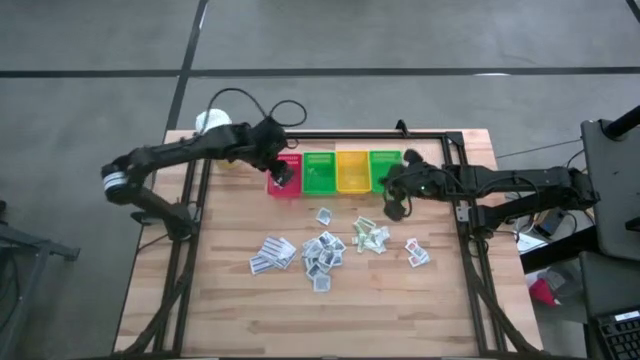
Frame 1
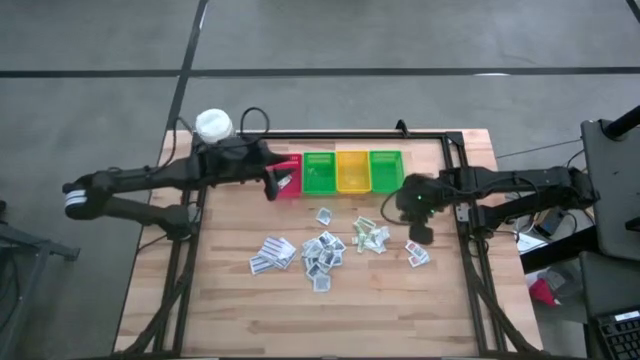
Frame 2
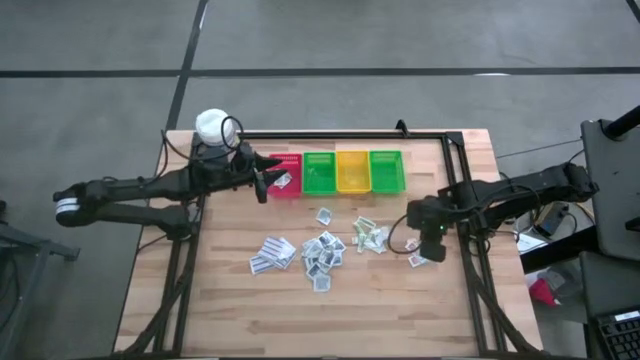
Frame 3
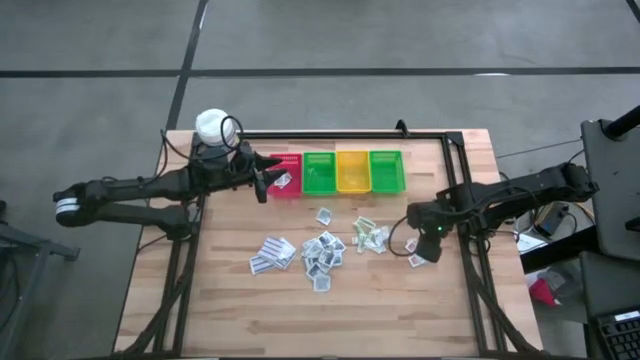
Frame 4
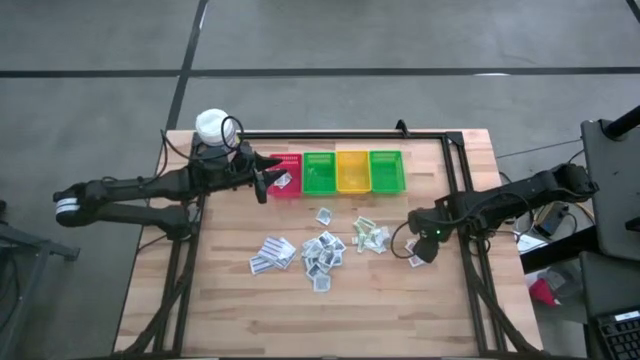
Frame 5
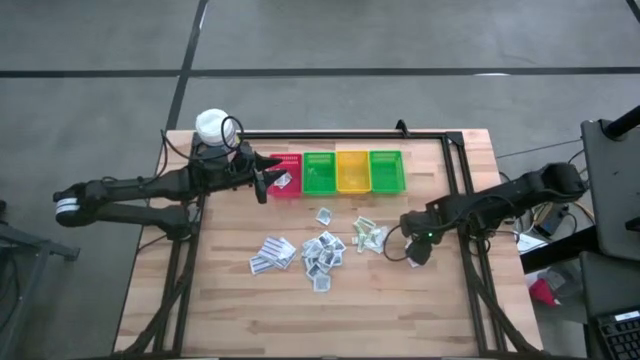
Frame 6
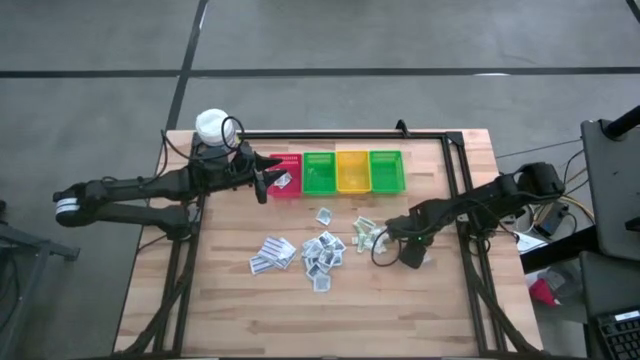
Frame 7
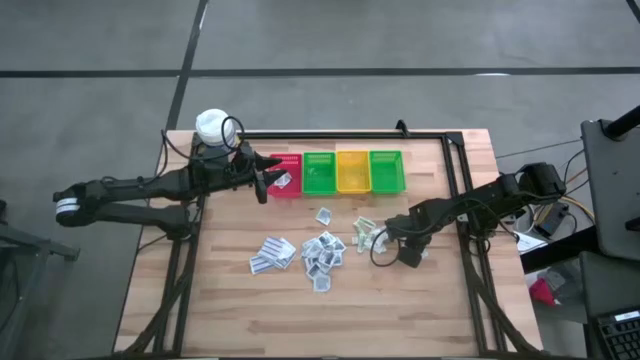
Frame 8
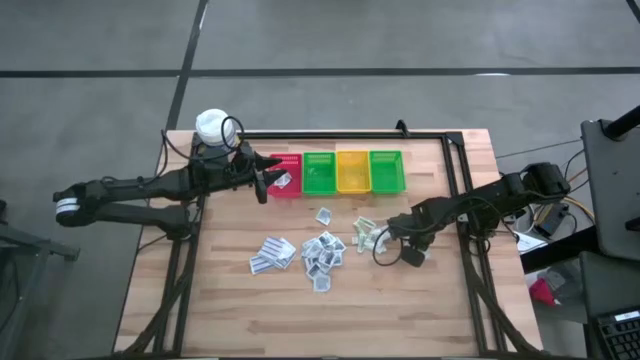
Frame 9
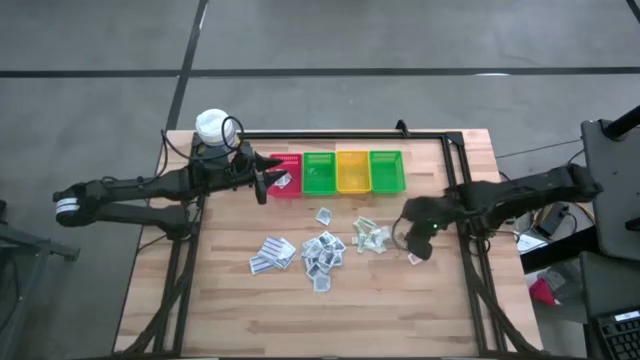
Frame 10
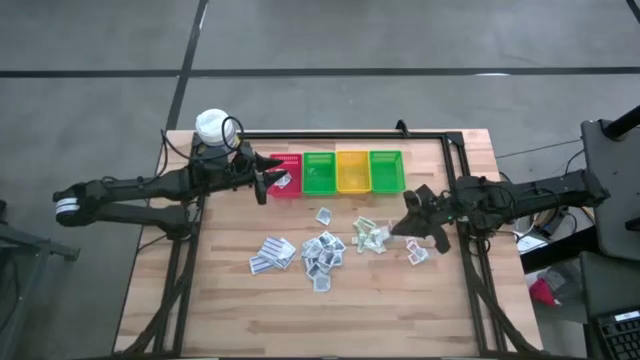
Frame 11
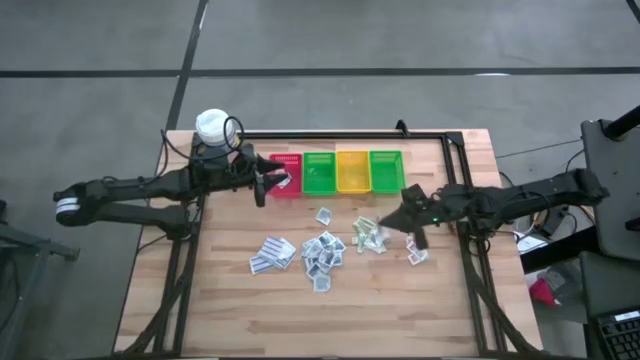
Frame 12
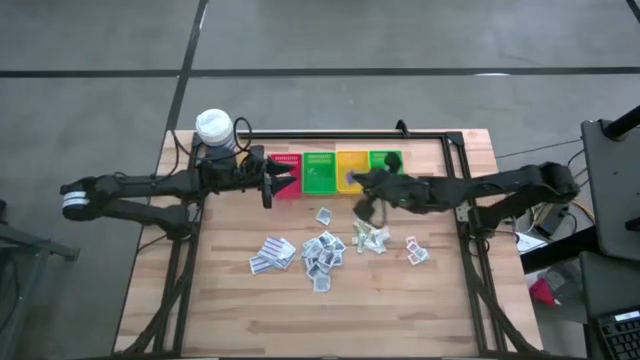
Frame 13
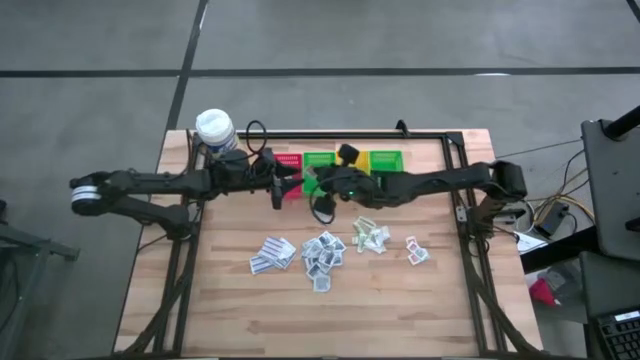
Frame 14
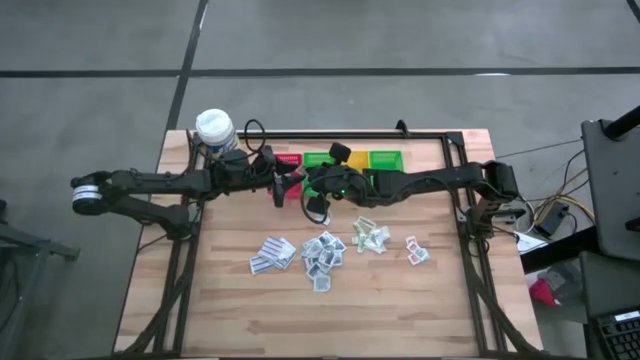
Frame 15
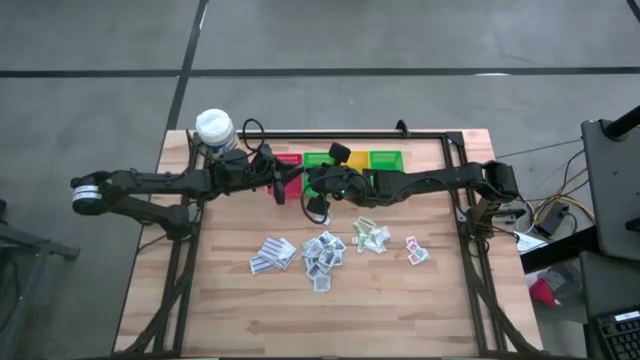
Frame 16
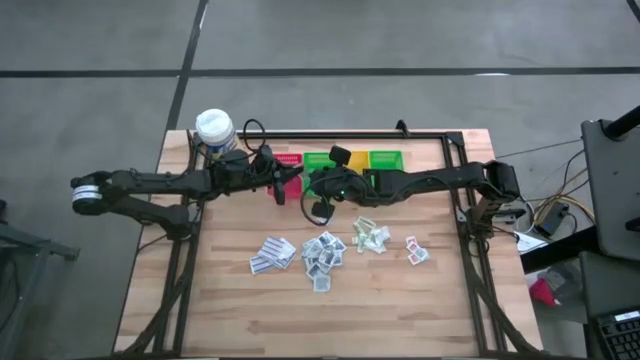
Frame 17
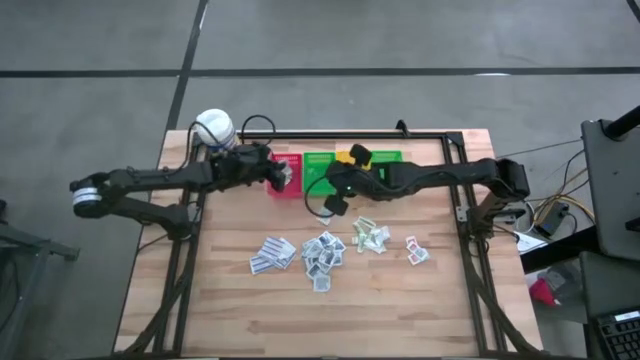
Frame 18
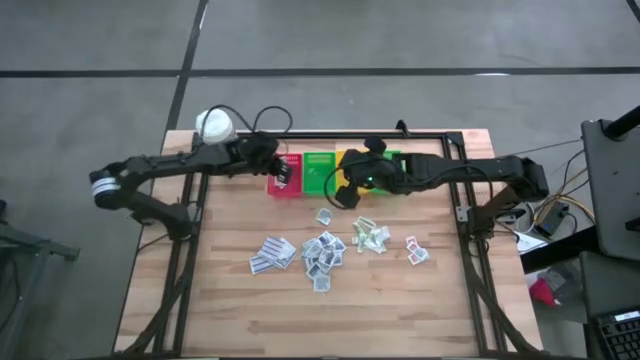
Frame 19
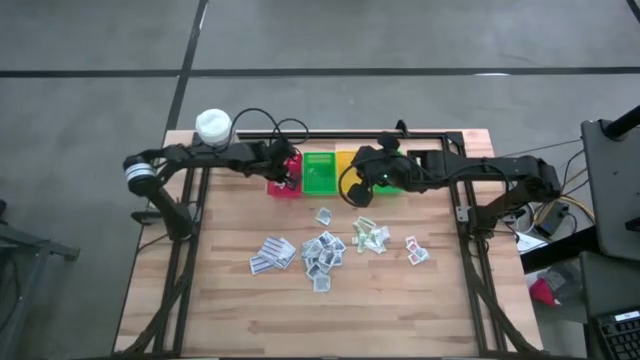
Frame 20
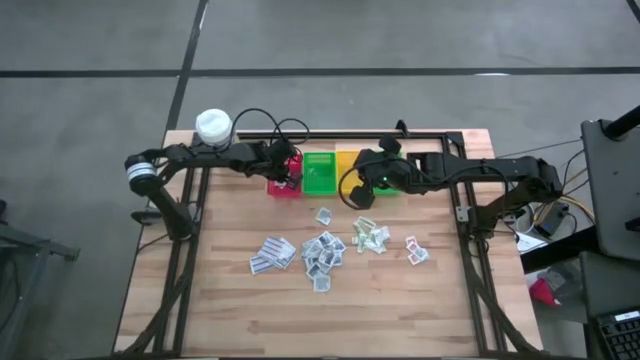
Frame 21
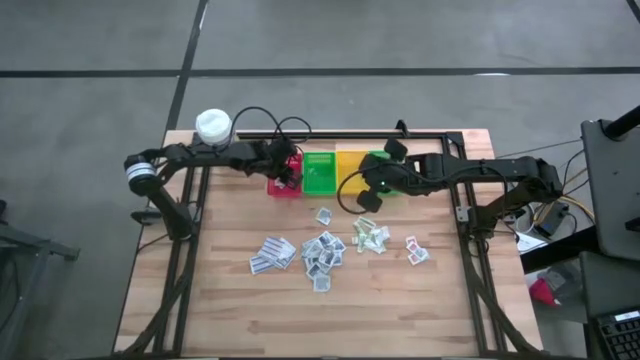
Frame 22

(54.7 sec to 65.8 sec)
Task: Pick & Place First Aid Supplies
Put the ointment pack into the red bin

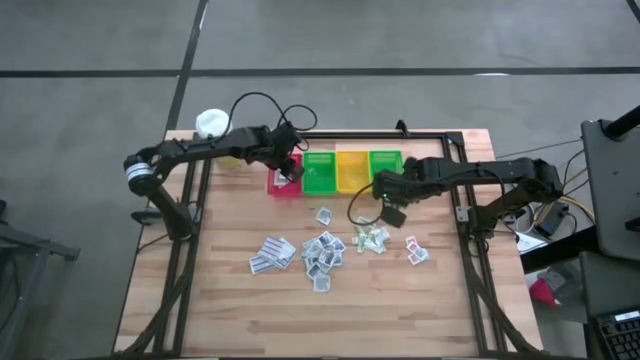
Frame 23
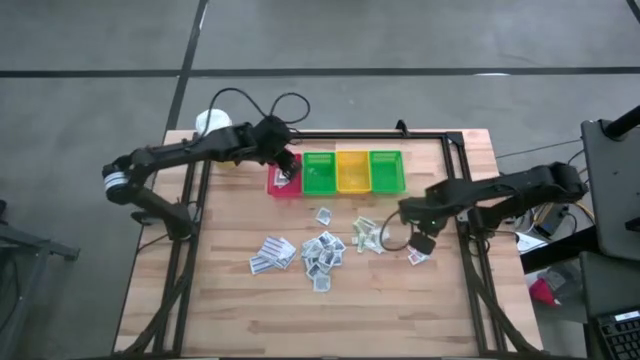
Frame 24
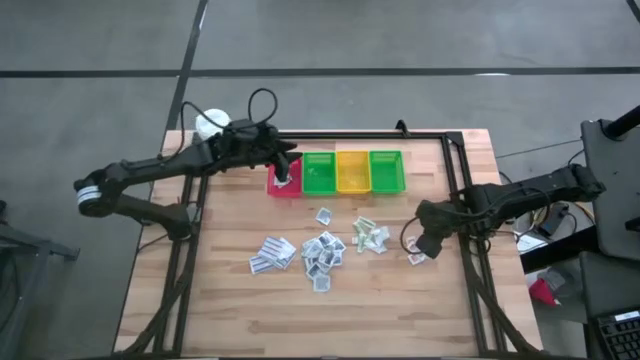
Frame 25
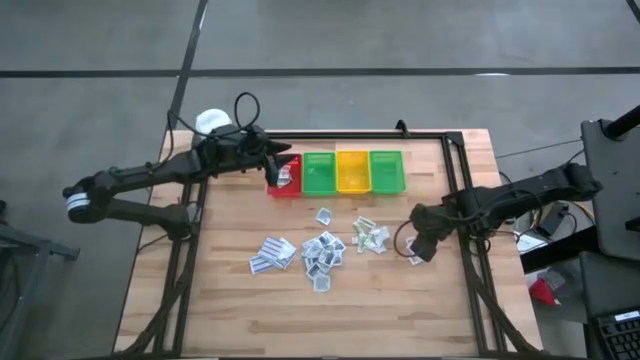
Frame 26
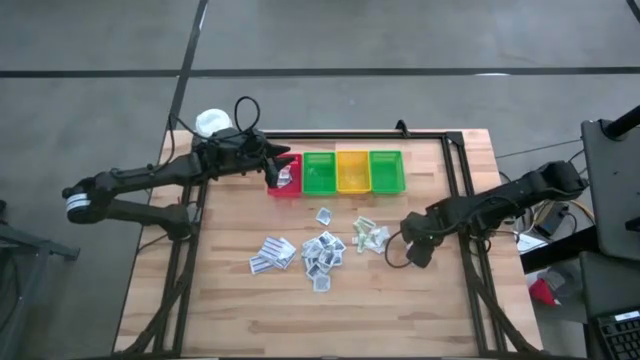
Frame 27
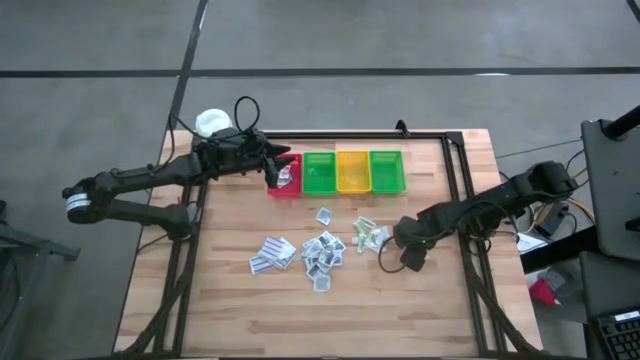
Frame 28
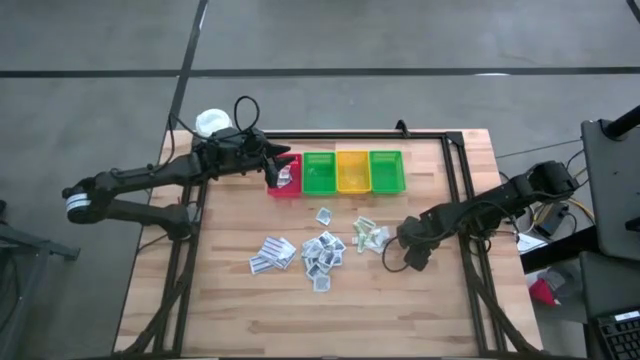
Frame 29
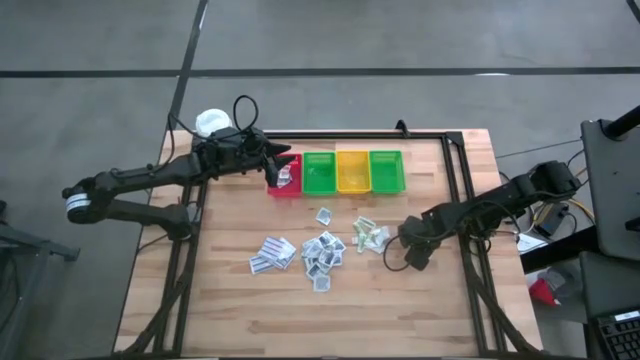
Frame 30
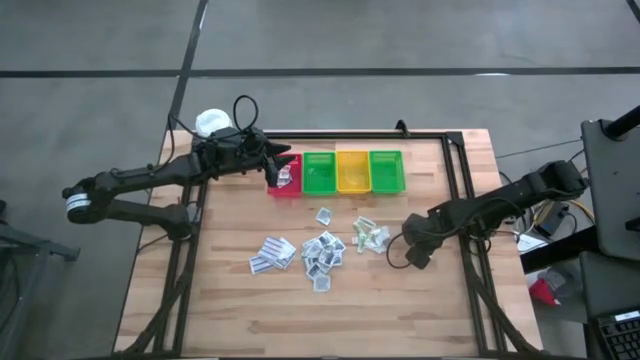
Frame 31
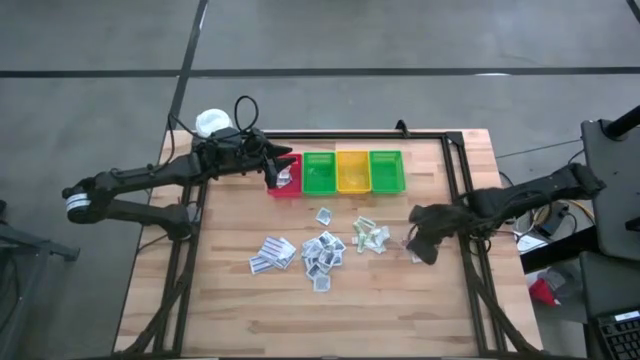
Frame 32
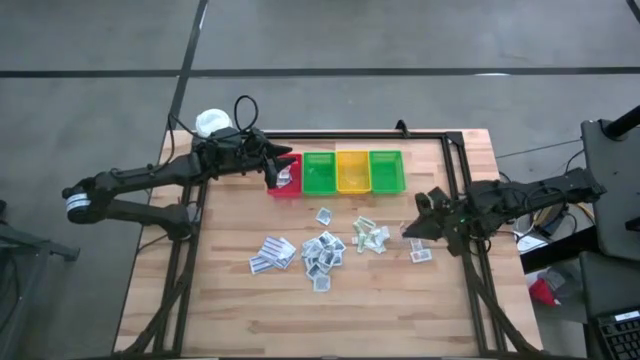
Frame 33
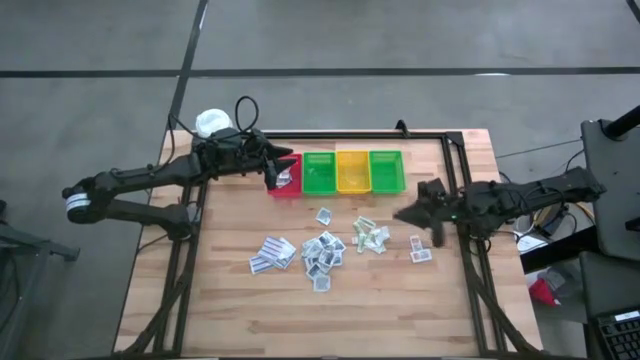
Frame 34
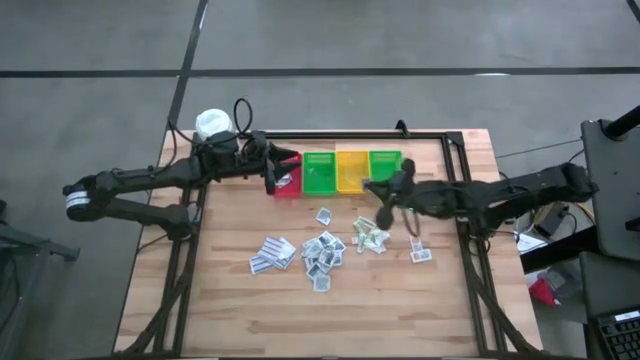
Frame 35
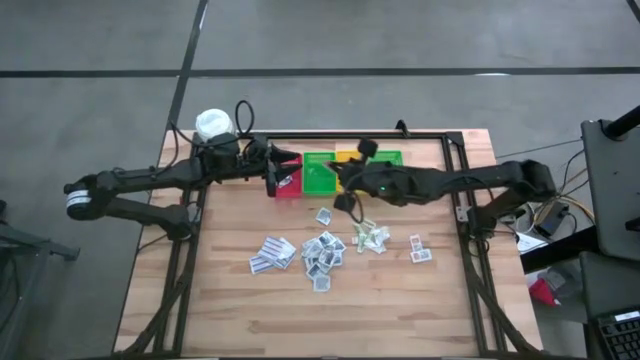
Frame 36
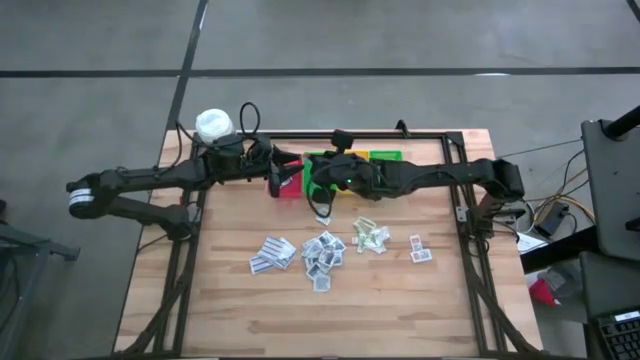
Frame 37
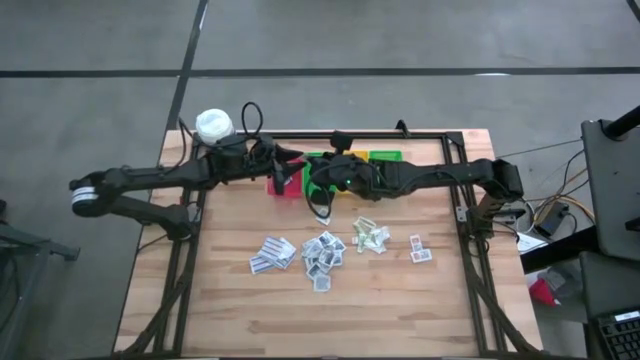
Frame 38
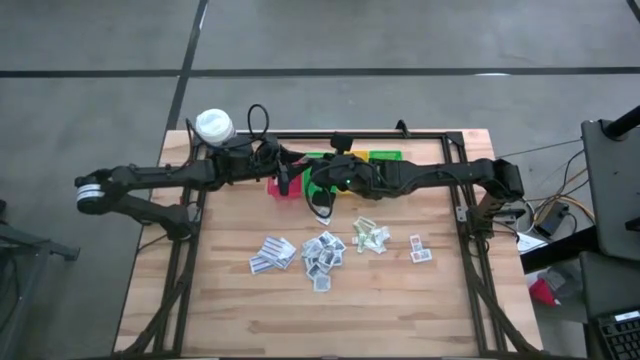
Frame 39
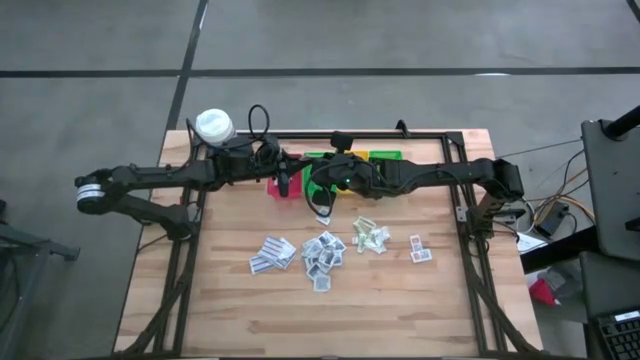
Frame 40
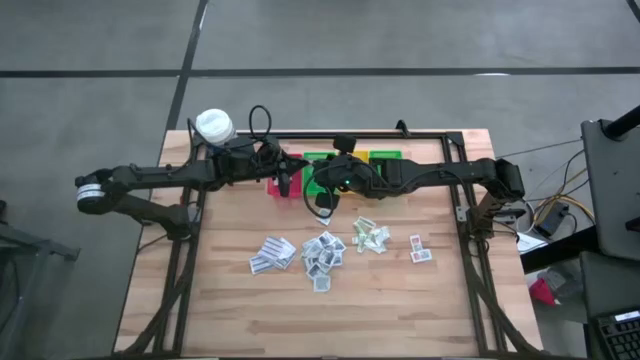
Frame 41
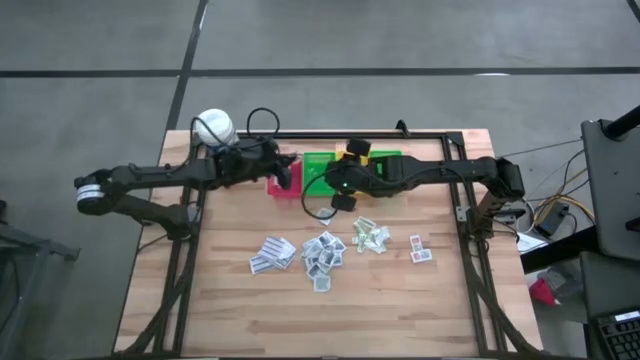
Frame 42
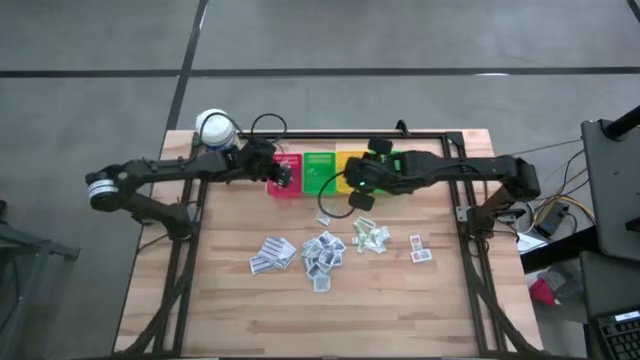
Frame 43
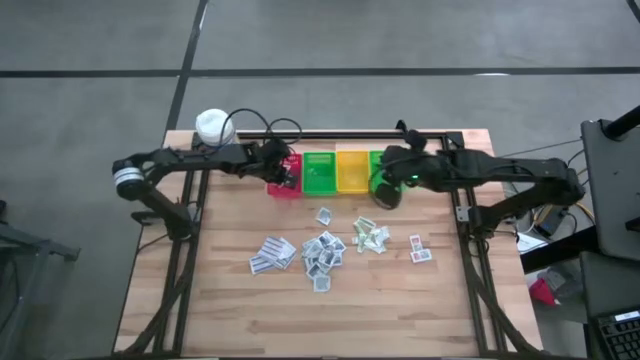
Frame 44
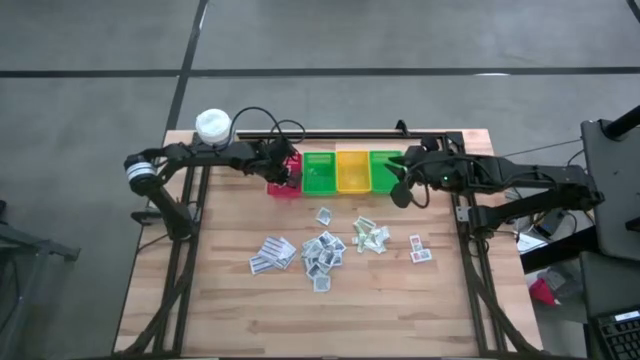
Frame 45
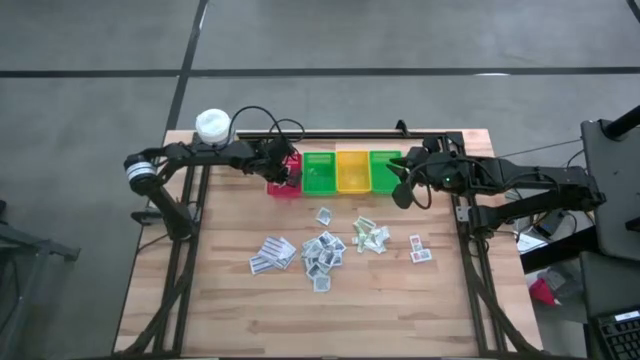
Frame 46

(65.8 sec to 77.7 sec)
Put the ointment pack into the red bin
